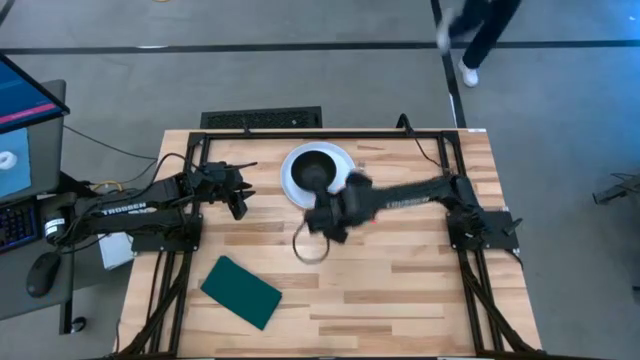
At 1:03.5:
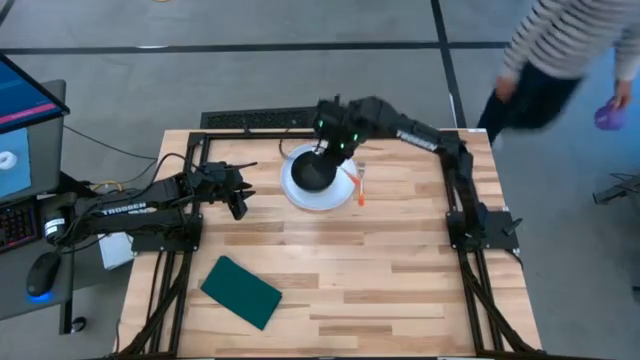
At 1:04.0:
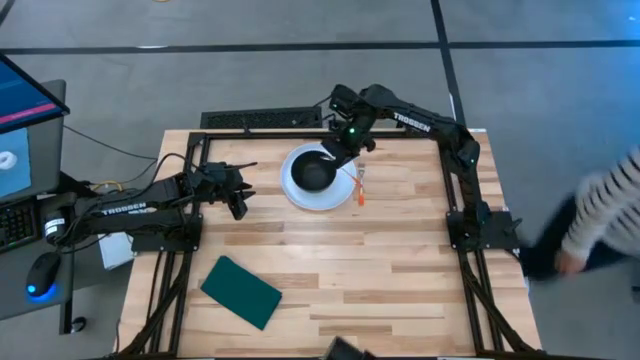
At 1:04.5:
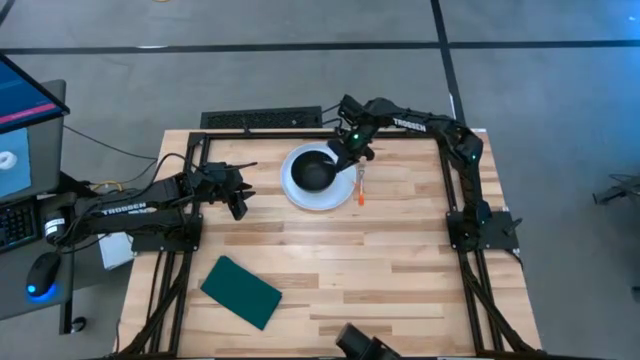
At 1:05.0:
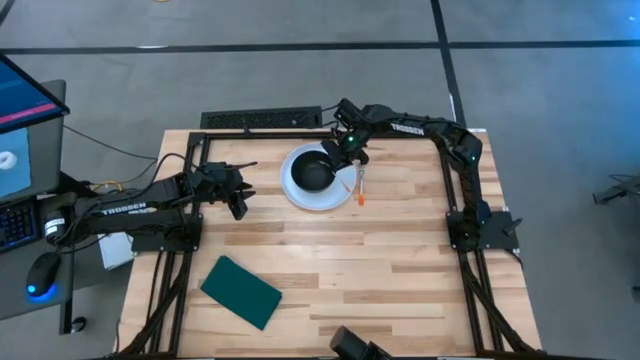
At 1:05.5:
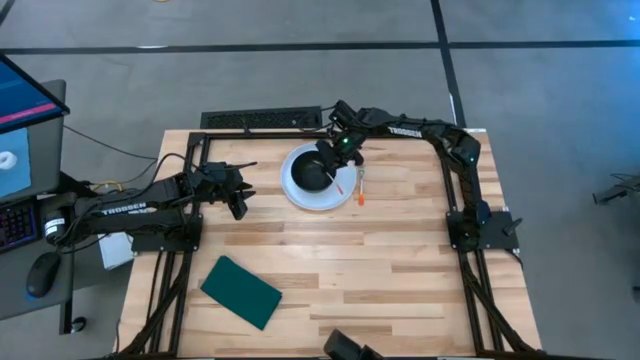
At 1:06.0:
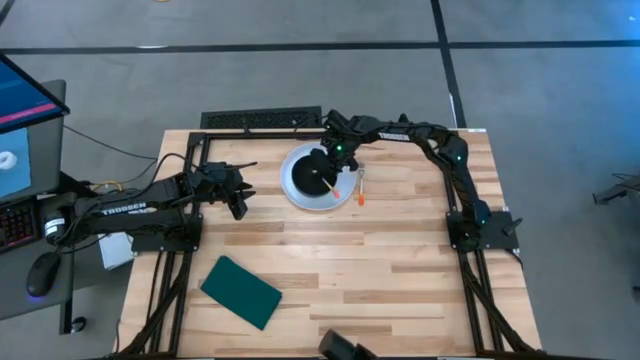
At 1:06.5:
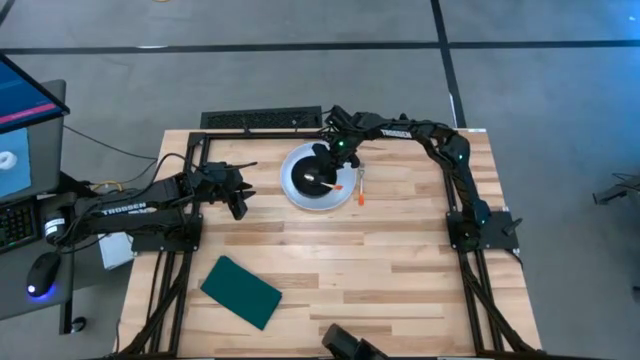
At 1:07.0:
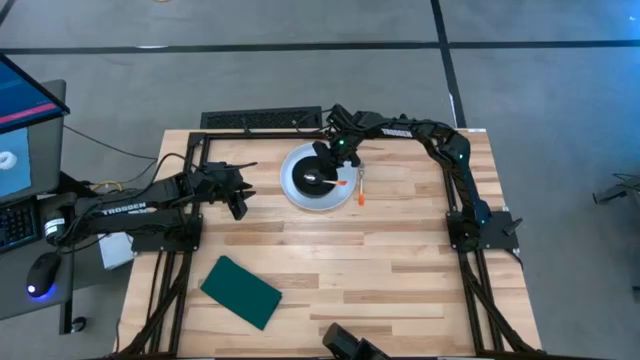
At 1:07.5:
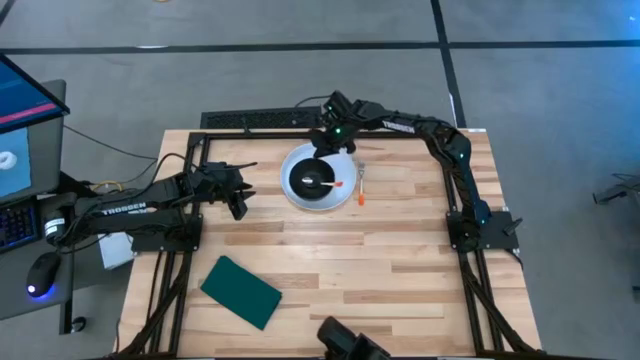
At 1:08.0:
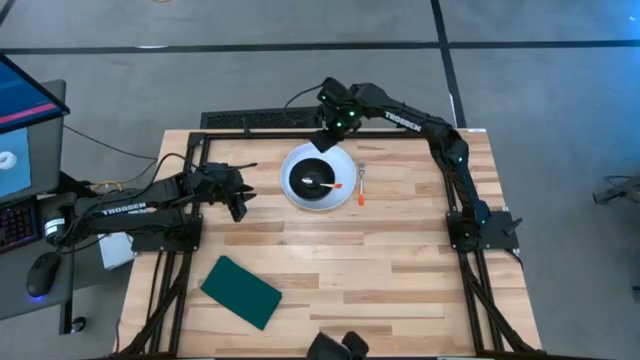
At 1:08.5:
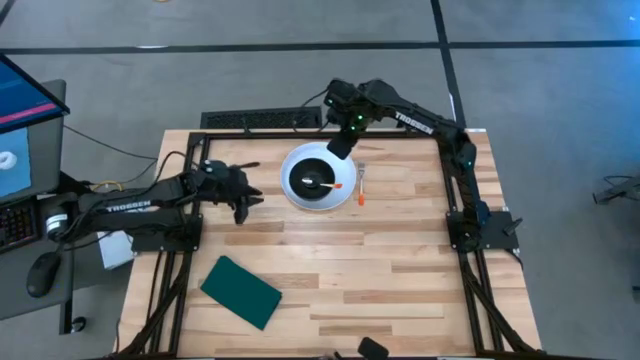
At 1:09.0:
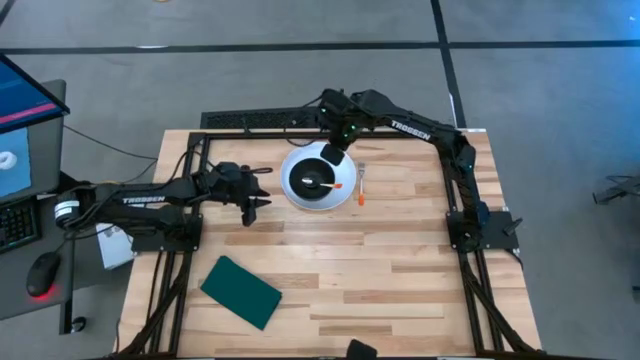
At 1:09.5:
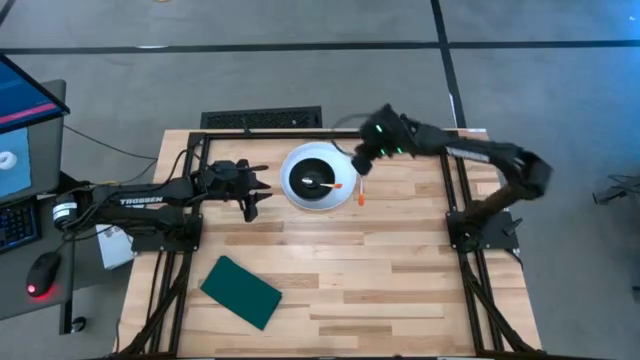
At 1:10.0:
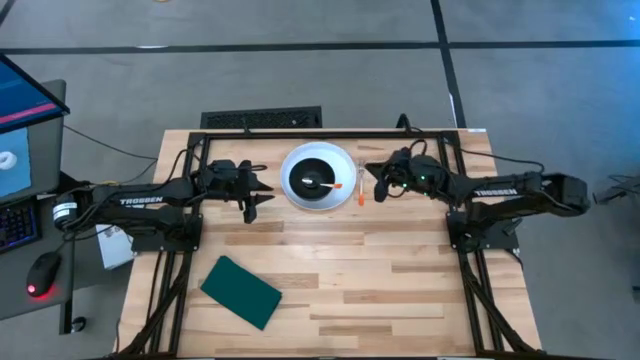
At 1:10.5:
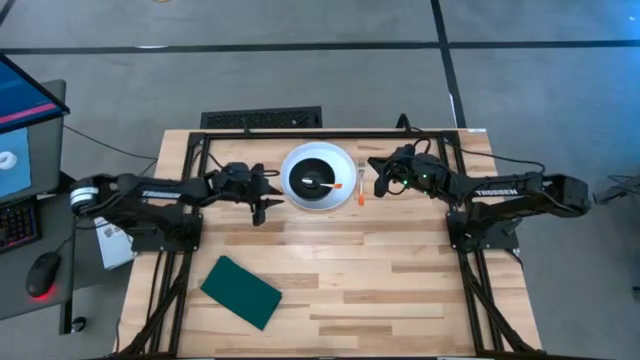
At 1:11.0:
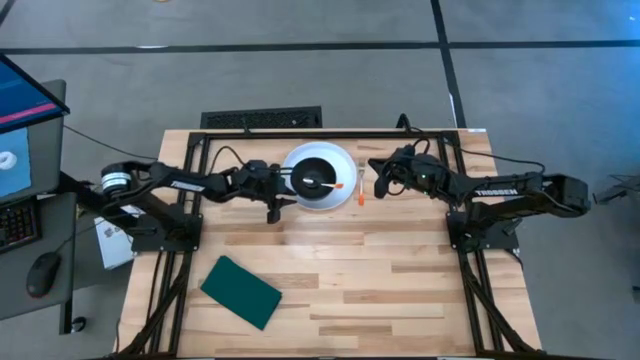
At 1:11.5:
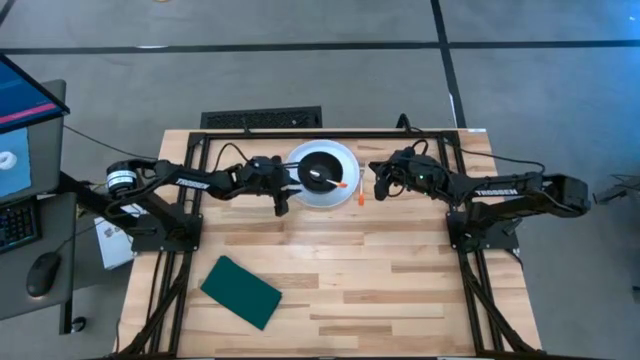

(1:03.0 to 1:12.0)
Task: Set table place
Place the 2nd spoon with the orange handle into the black bowl

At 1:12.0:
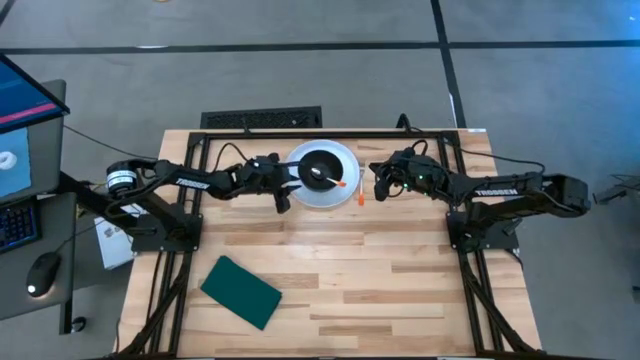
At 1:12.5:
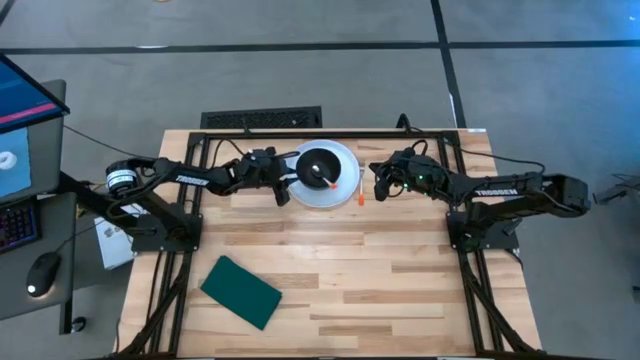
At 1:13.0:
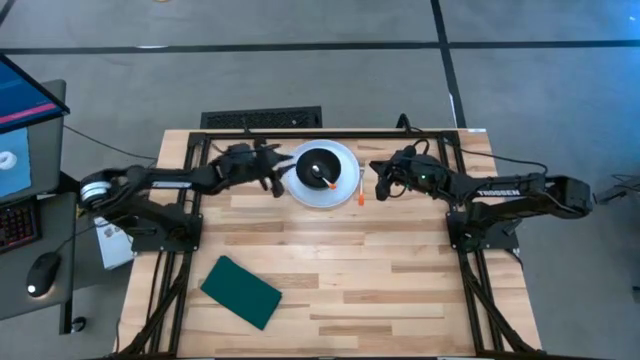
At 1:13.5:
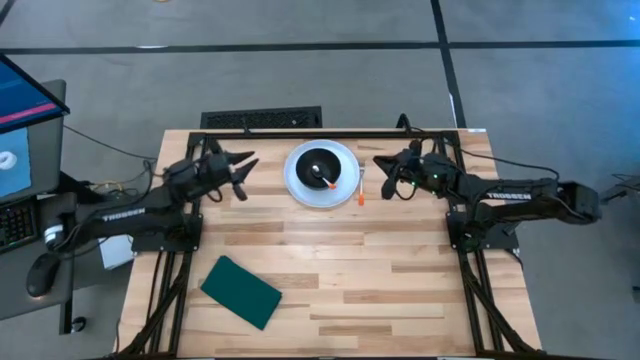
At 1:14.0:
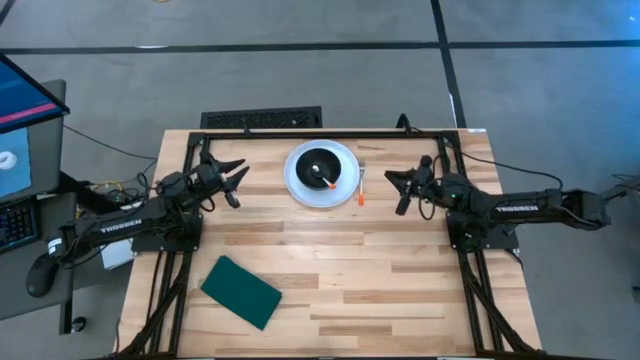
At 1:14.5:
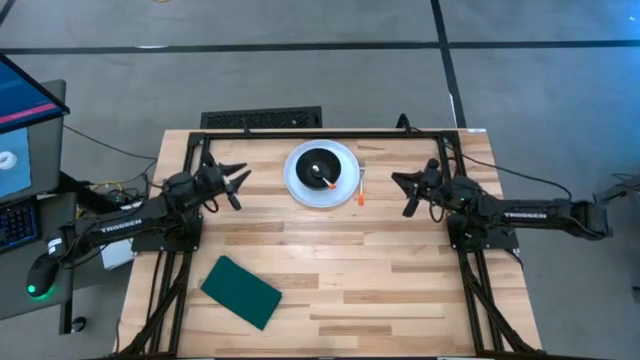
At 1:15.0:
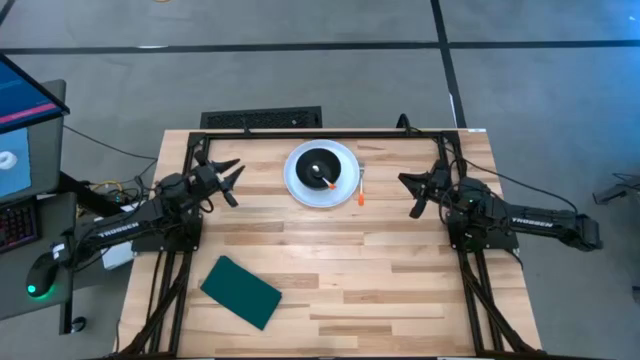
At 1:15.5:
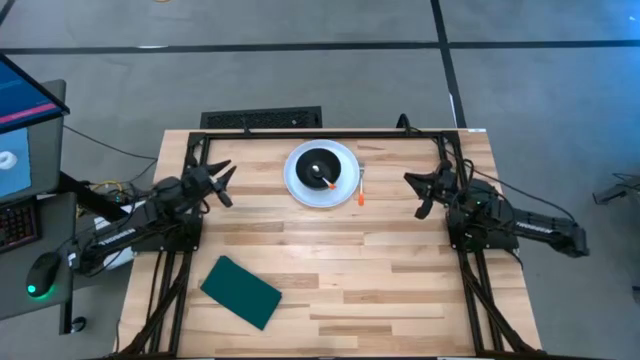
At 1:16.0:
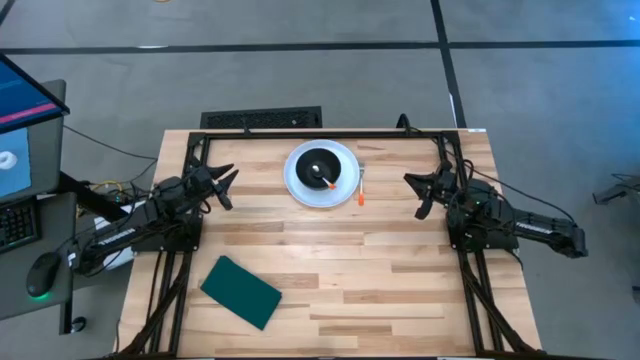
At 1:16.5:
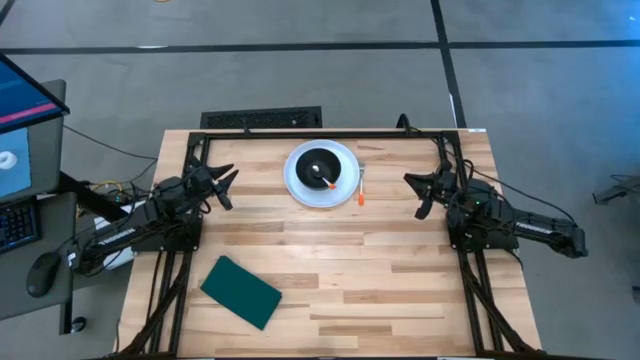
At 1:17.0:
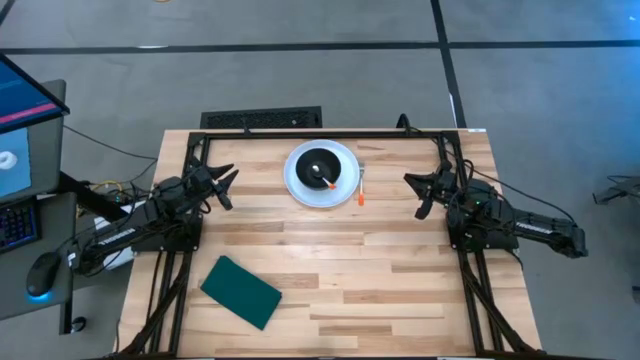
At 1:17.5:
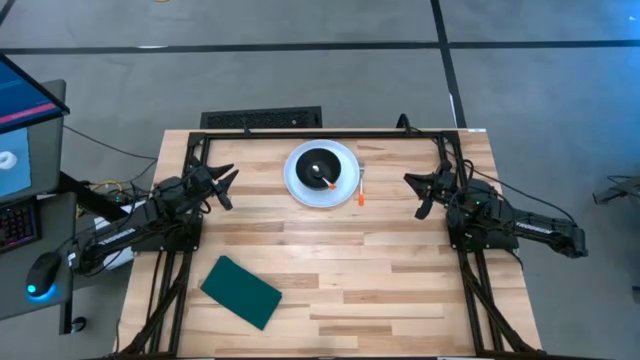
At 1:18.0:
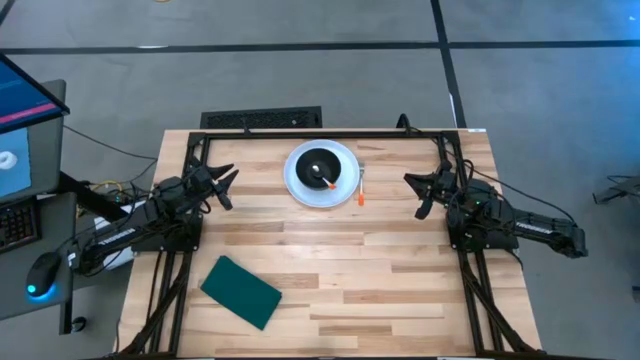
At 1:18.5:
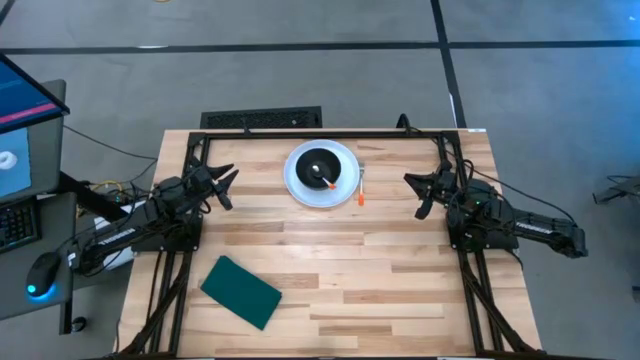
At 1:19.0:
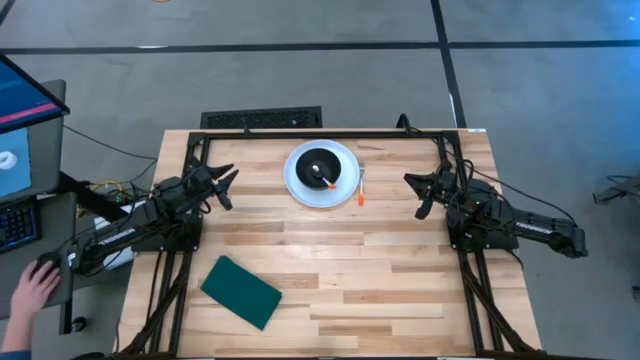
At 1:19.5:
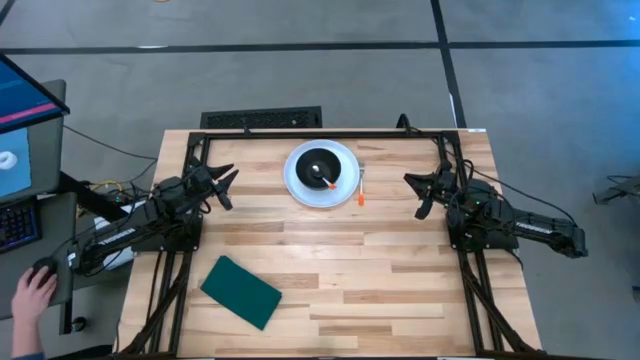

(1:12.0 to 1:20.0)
Return to Home Position

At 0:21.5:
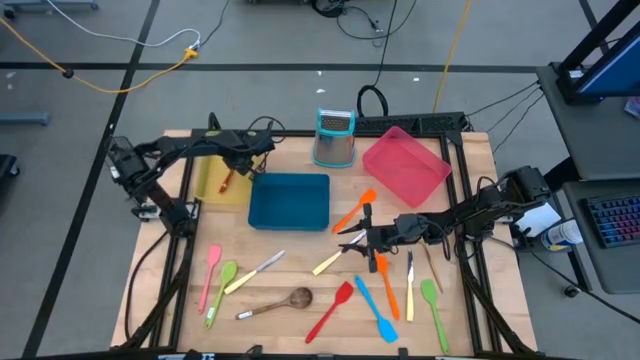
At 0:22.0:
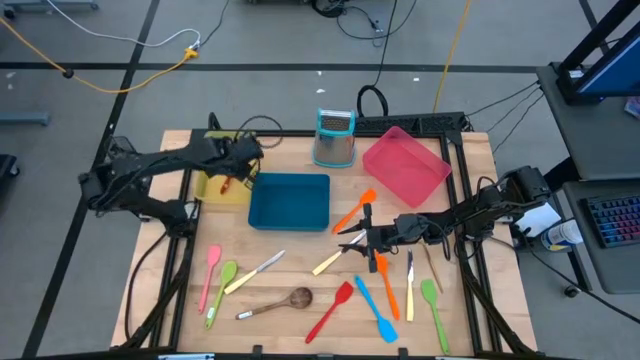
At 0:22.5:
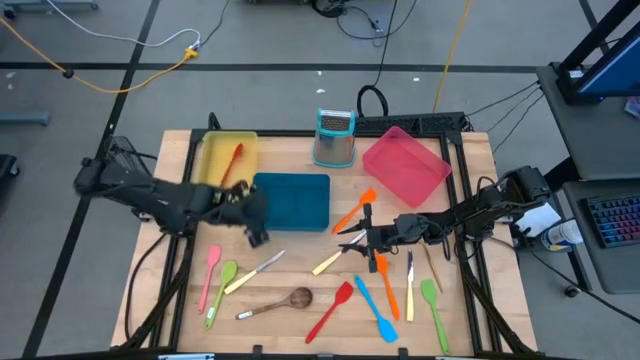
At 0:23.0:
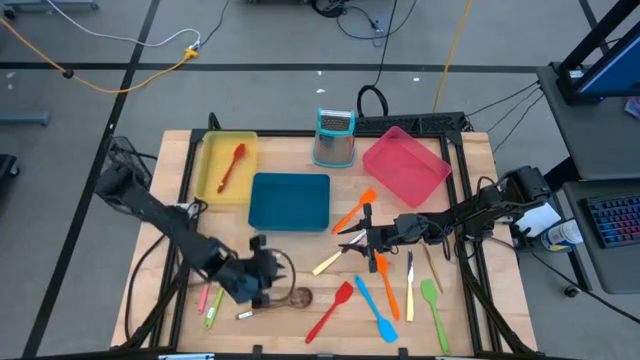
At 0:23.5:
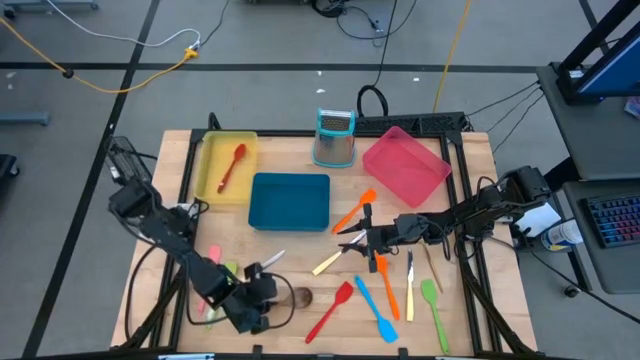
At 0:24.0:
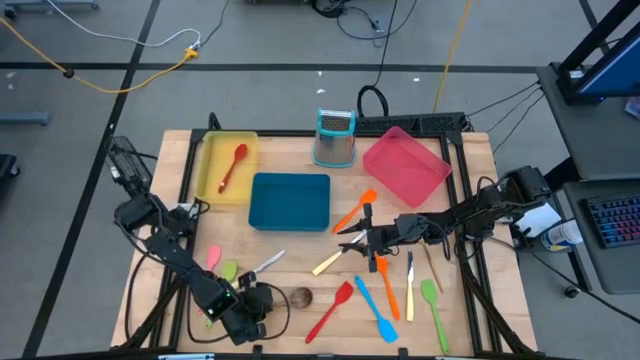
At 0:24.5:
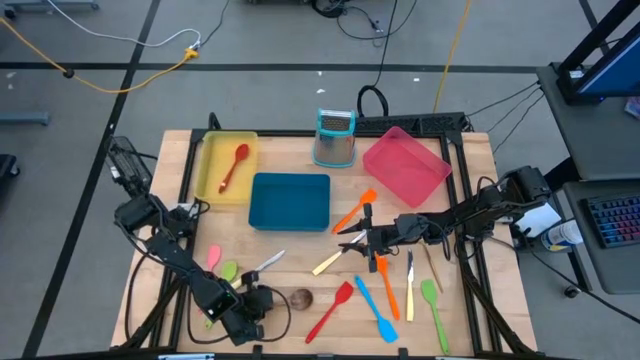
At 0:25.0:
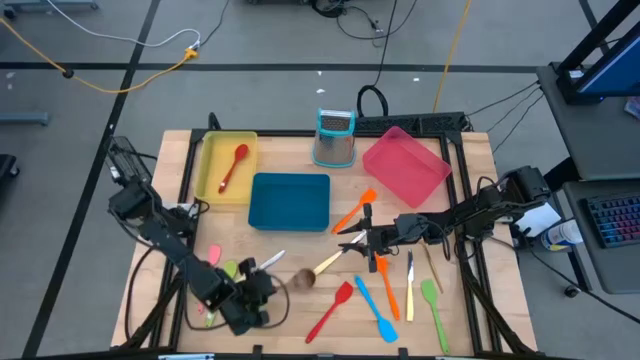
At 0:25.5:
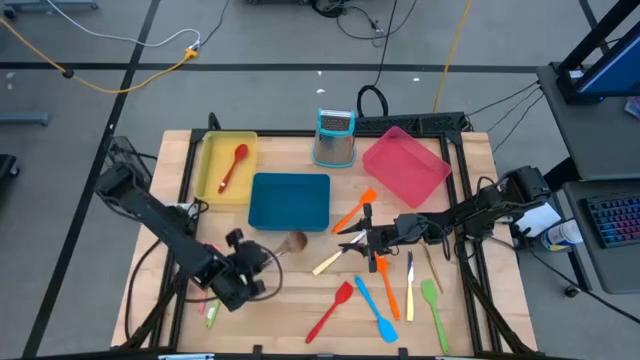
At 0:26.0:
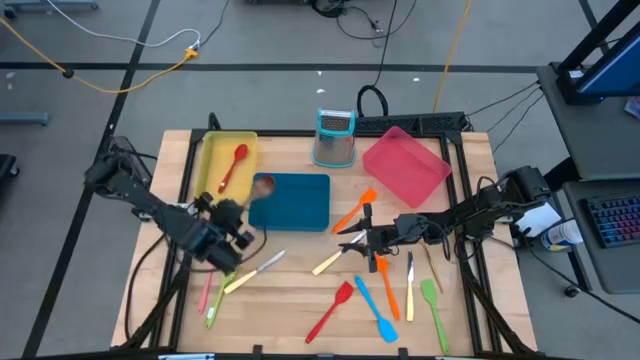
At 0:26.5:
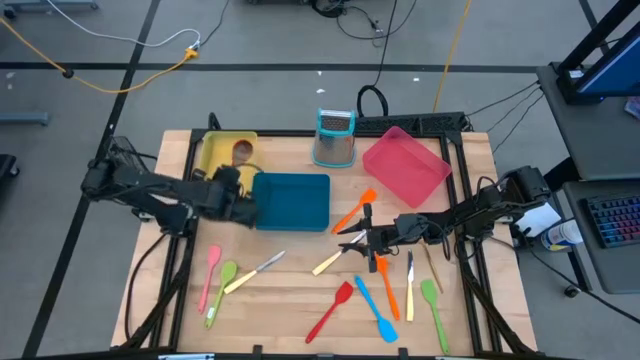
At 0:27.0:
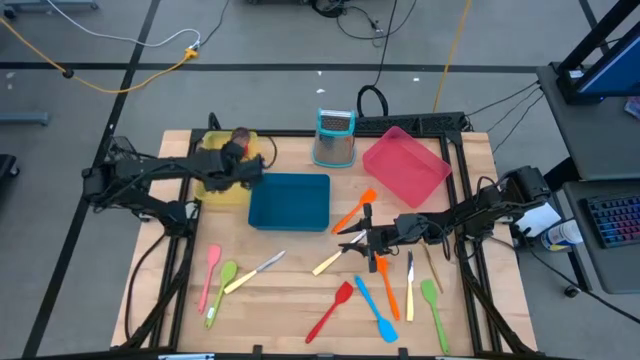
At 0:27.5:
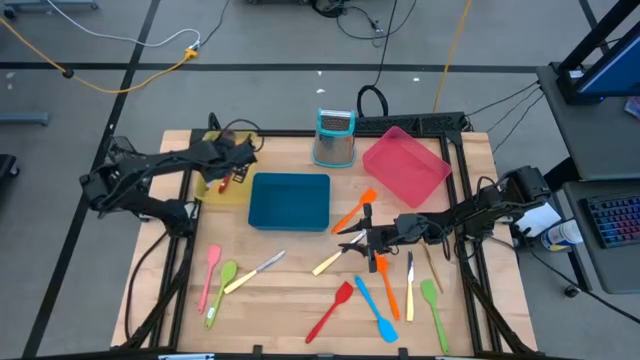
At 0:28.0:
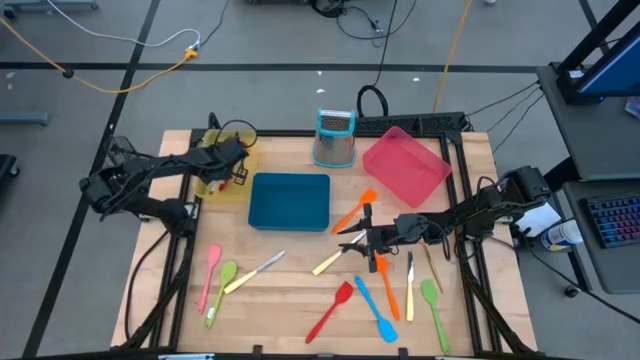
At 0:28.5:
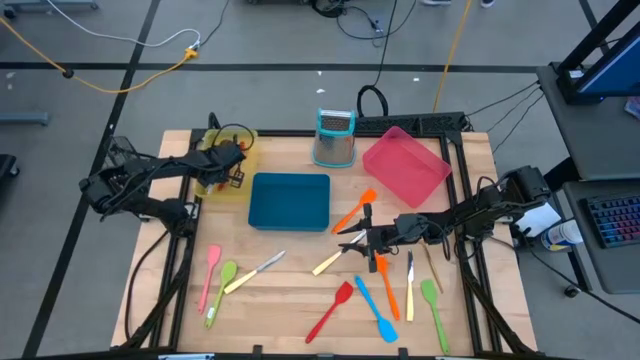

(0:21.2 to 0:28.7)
Task: Pick & Place Kitchen Items
Put the brown serving spoon into the yellow bin
